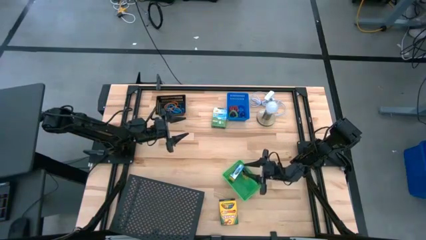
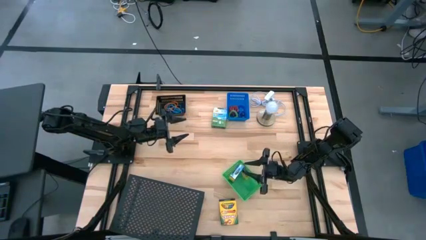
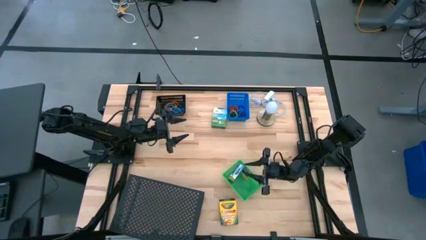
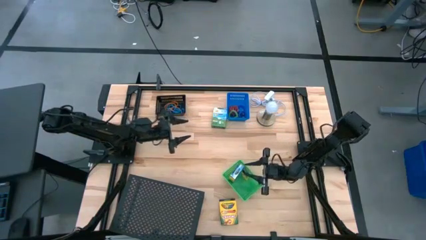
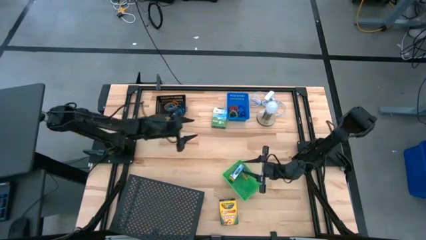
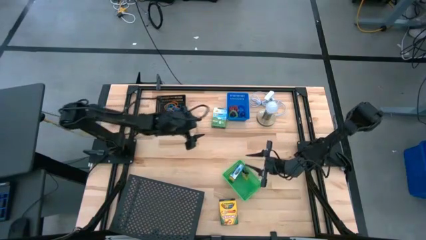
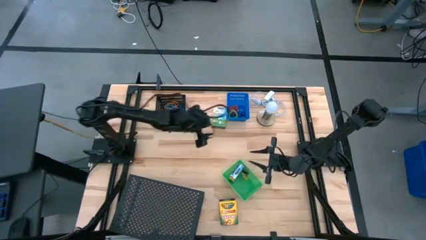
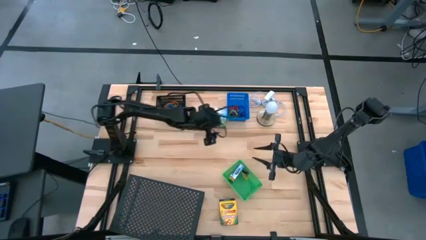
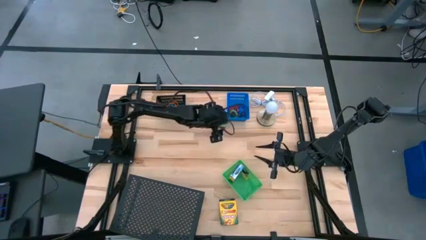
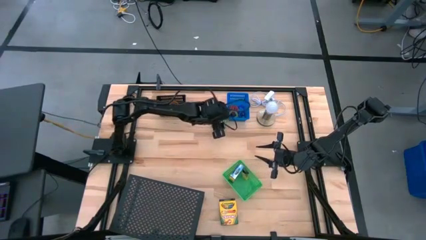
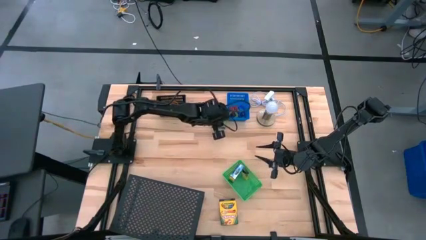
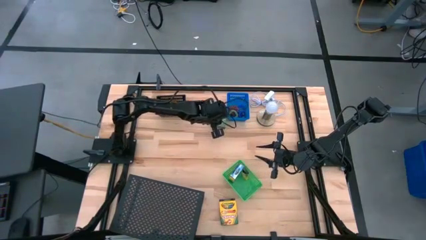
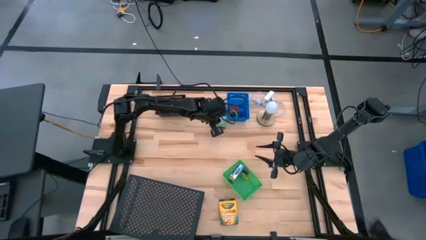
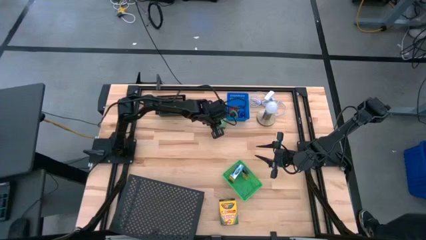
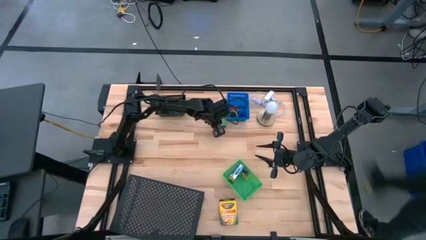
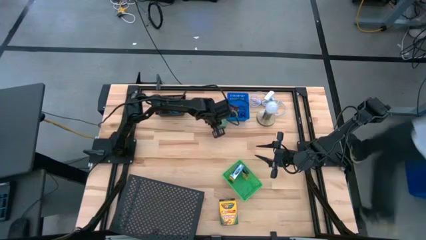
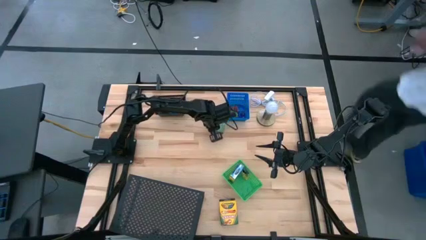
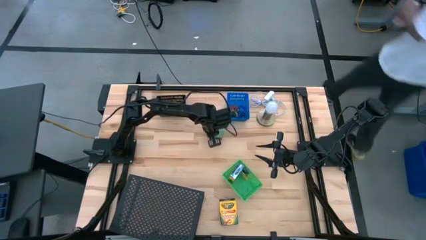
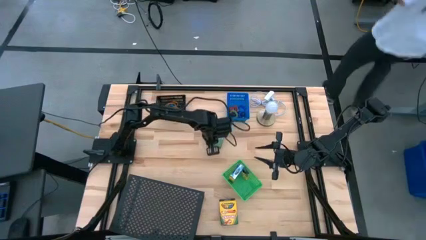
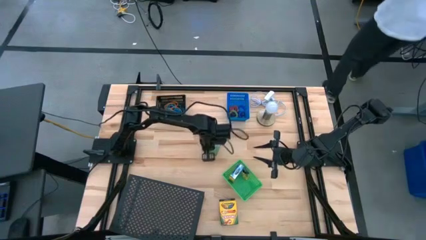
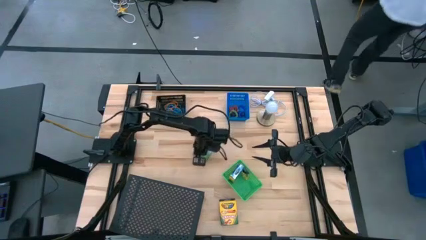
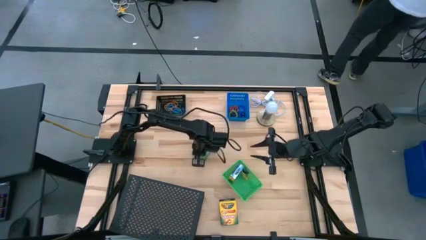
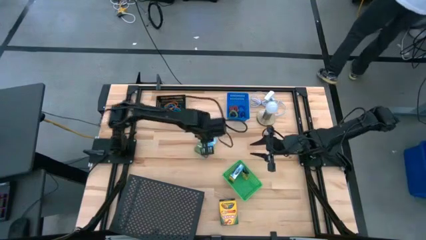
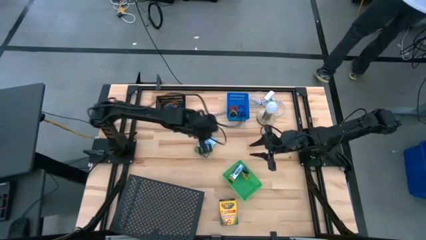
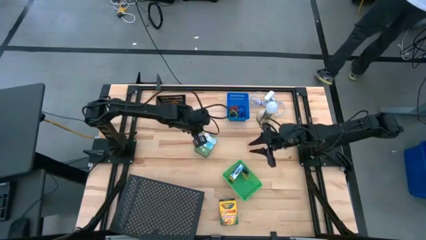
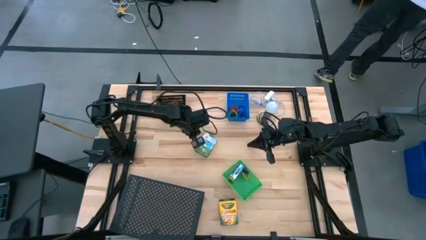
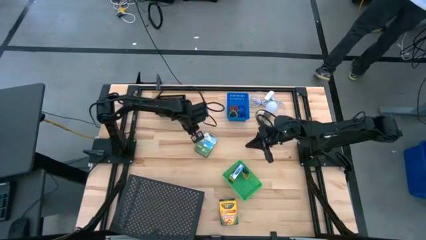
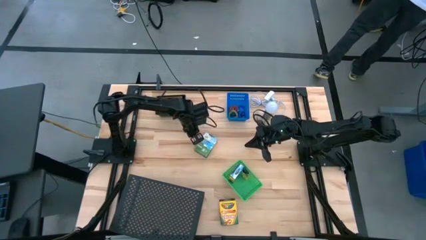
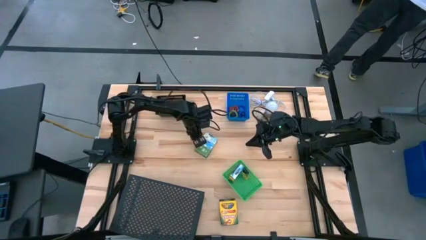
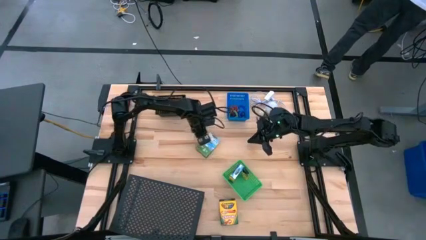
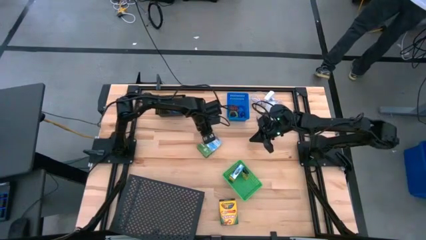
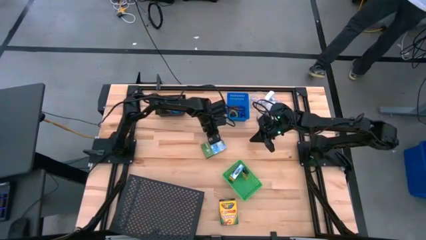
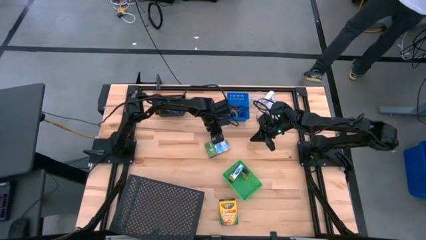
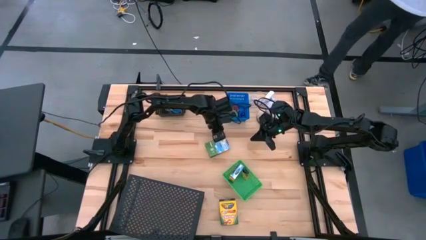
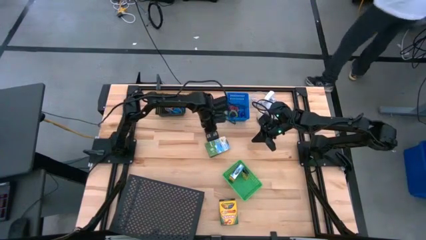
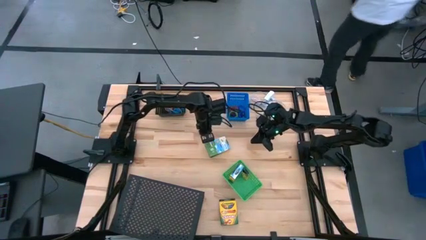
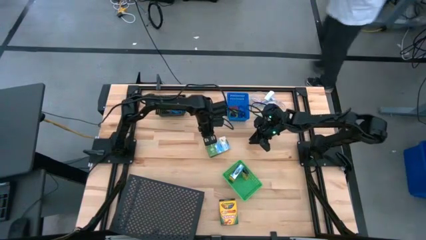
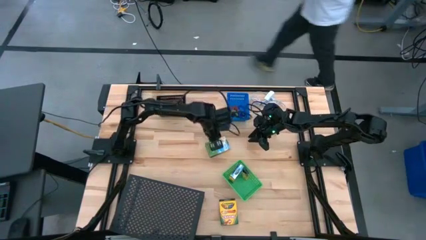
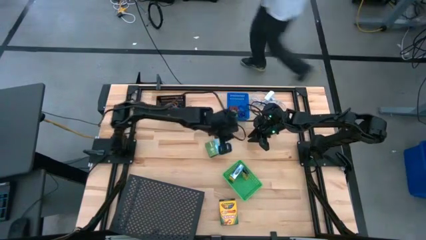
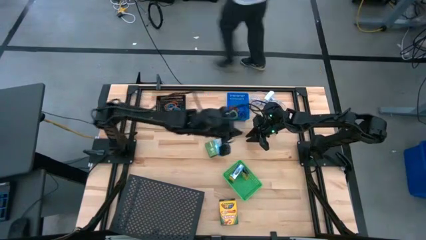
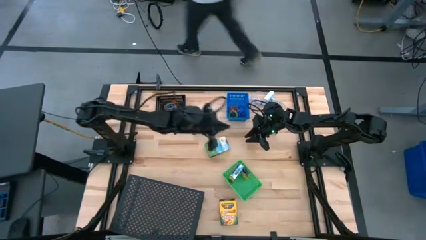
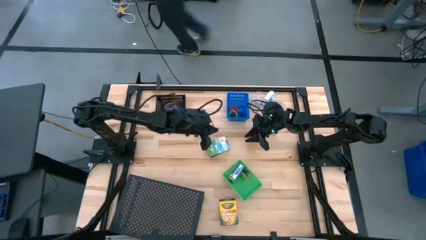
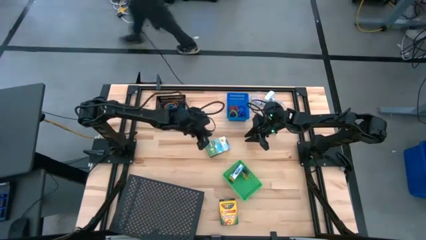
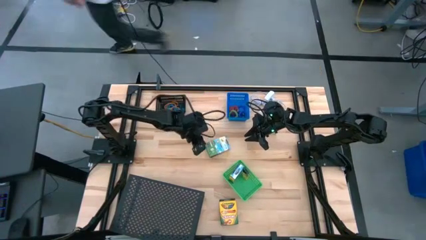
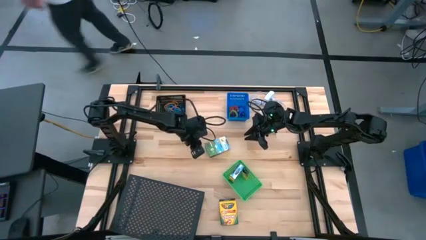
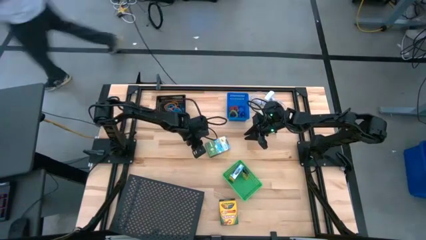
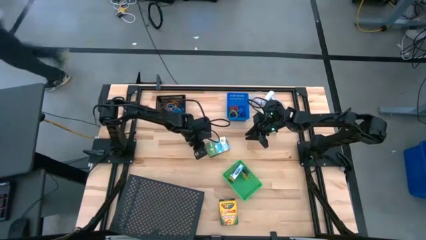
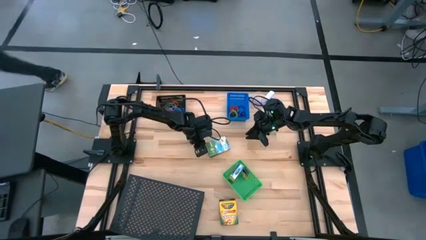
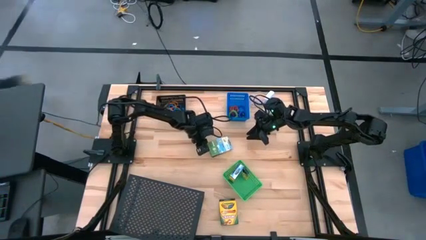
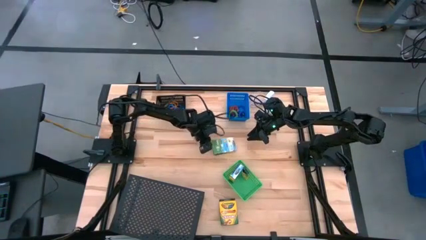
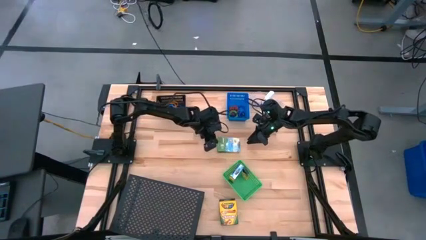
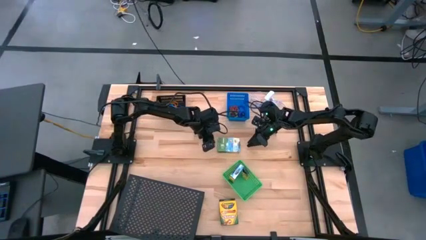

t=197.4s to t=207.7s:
Task: Pick & Place Office Desk Supplies
Put the top large crayon box into the green bin

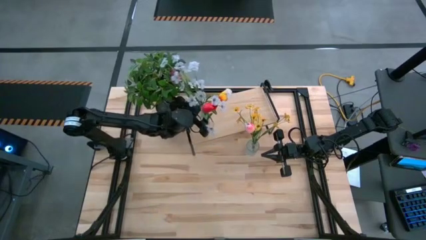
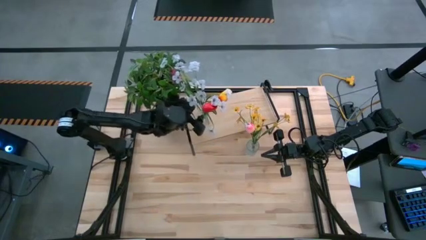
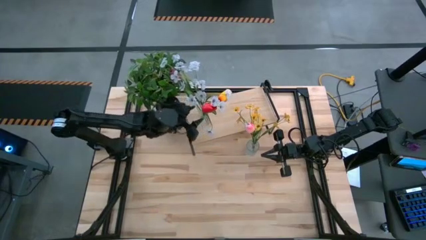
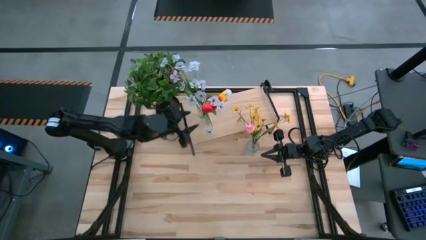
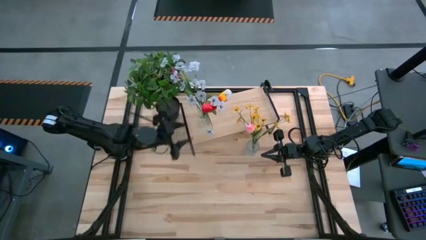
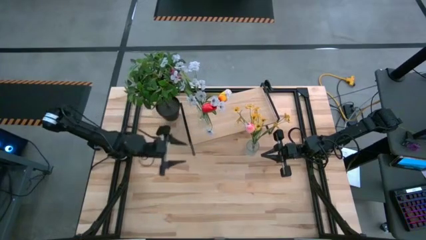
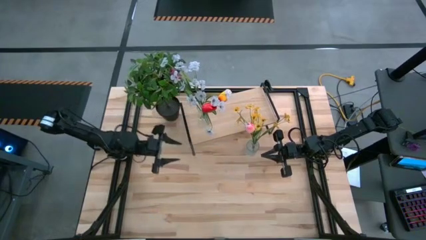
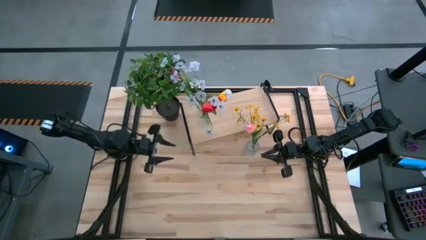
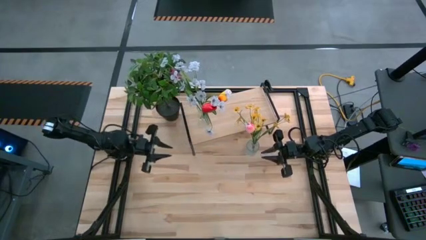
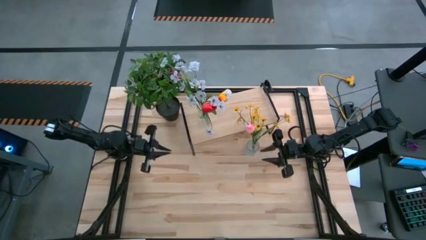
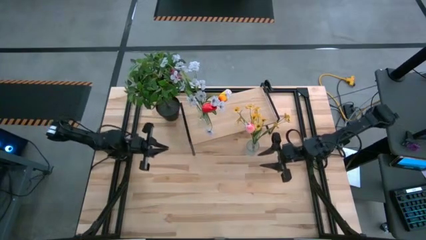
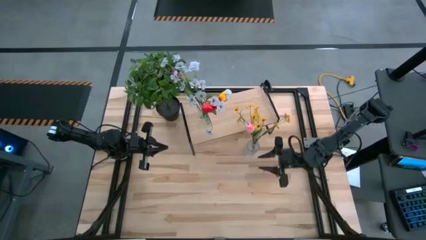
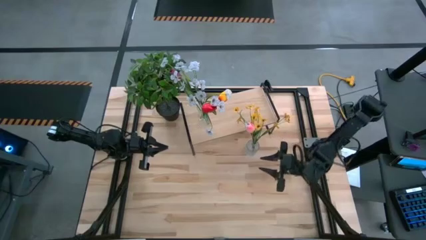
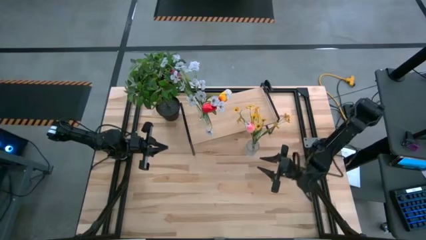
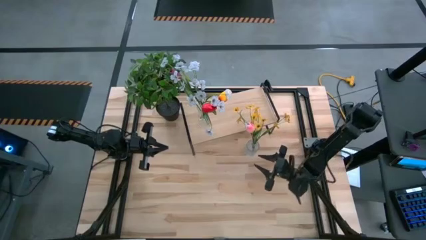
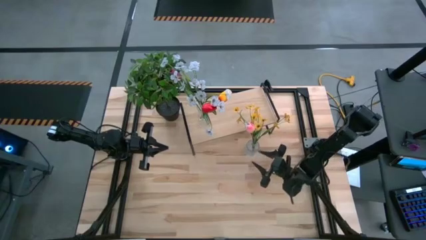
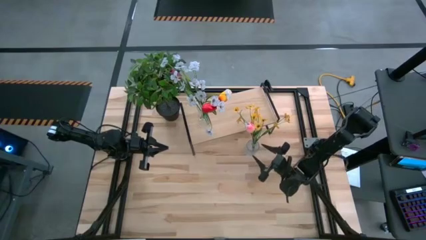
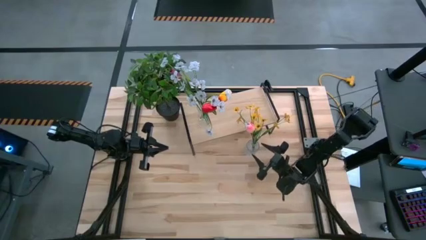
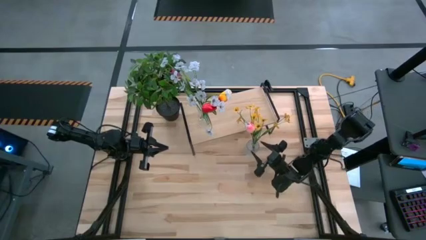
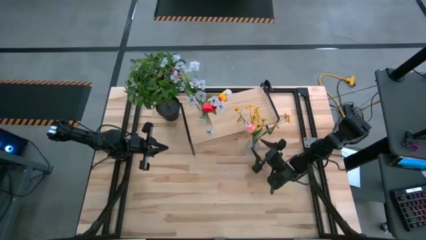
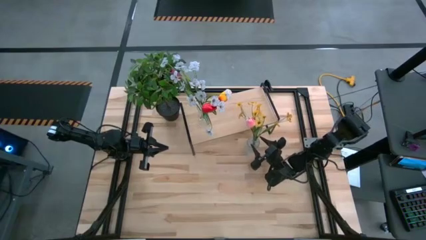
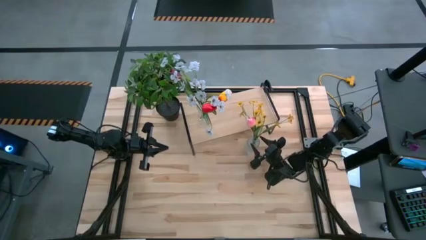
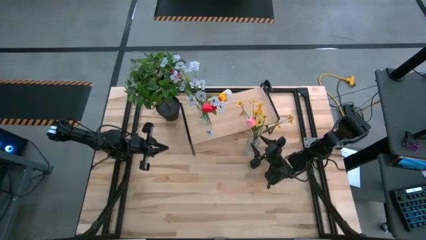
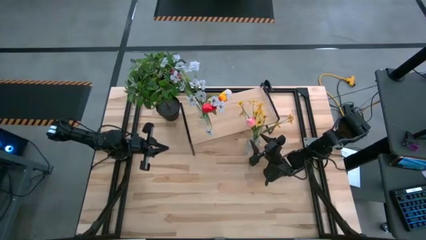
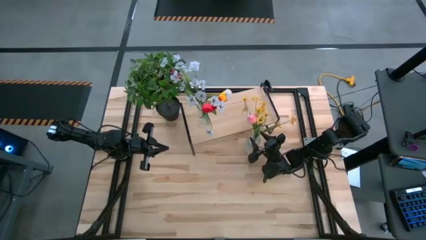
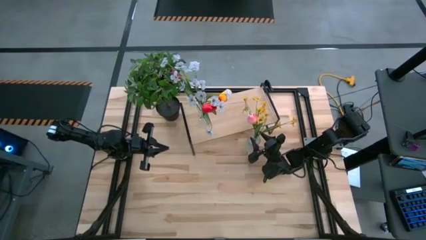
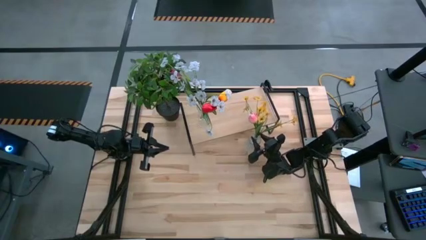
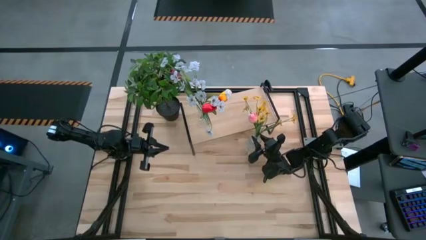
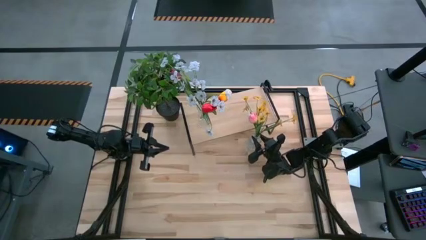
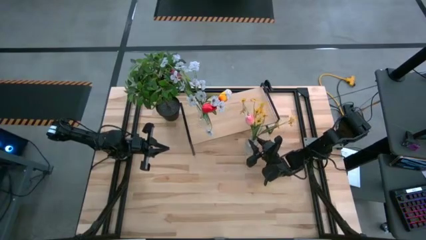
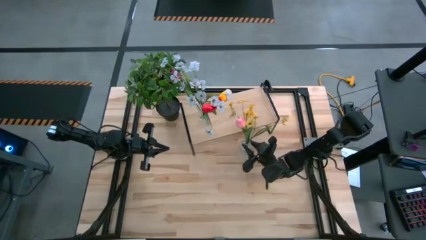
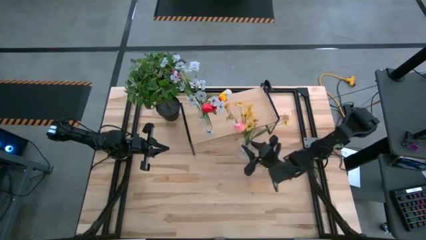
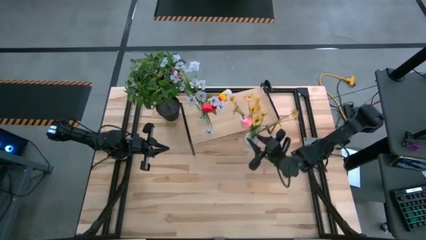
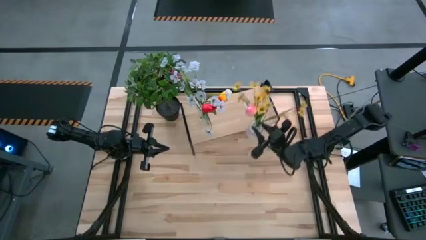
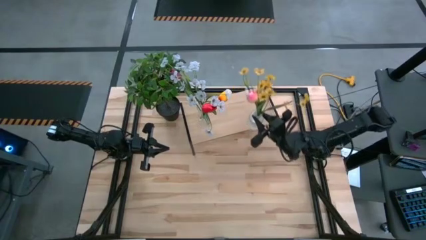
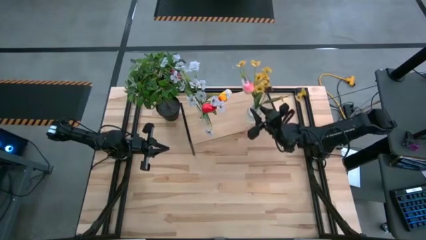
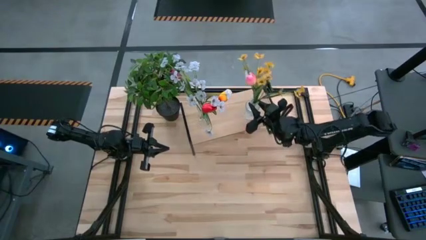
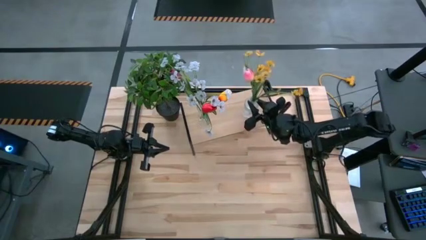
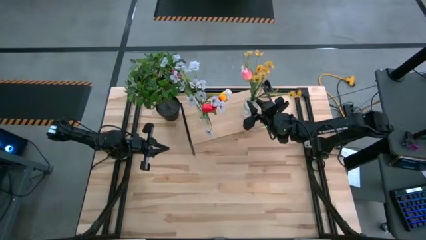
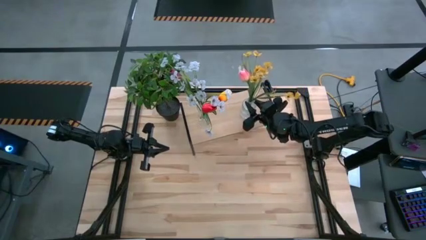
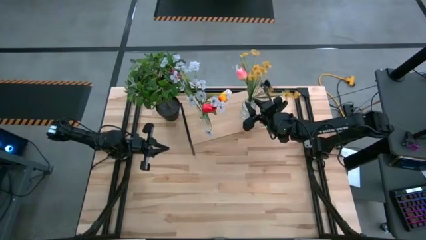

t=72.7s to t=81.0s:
Task: Pick and place flowers into a vace then onto a shelf
Move the transparent vase on the shelf
